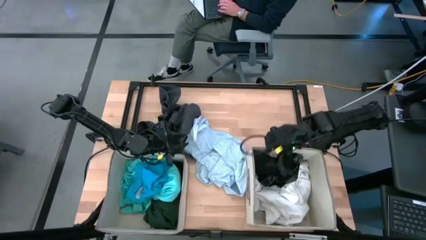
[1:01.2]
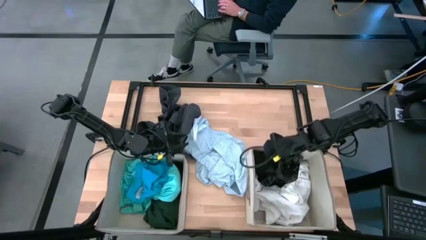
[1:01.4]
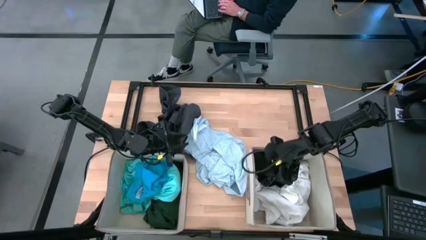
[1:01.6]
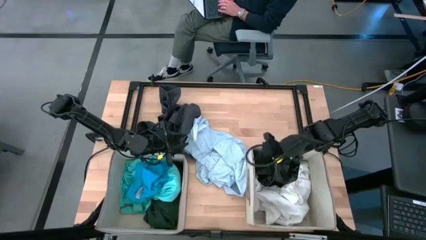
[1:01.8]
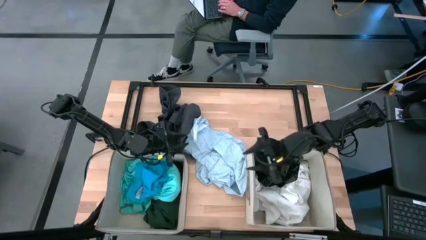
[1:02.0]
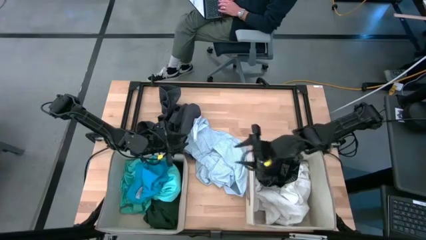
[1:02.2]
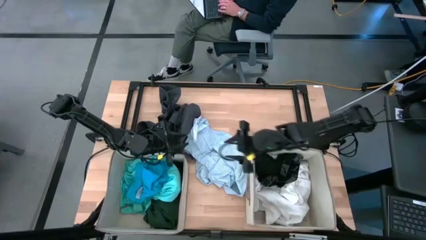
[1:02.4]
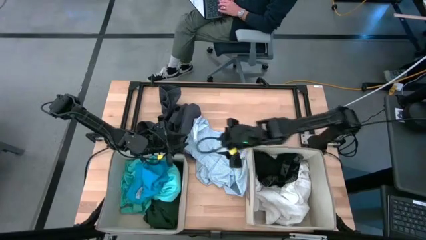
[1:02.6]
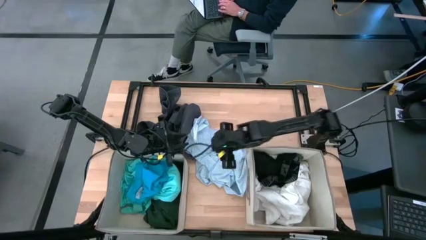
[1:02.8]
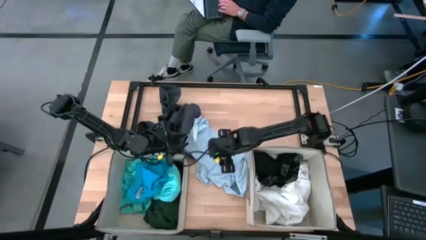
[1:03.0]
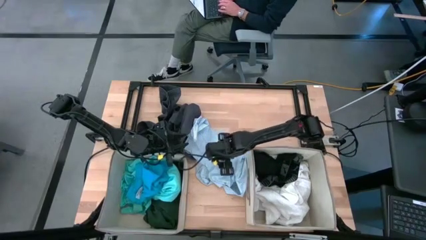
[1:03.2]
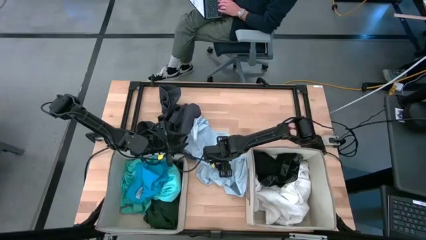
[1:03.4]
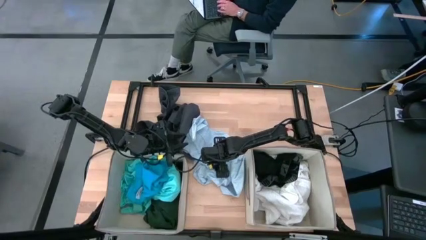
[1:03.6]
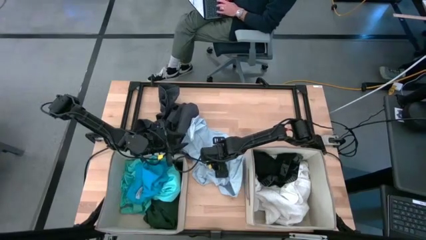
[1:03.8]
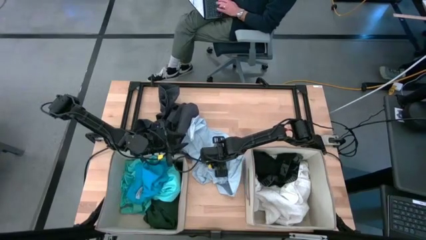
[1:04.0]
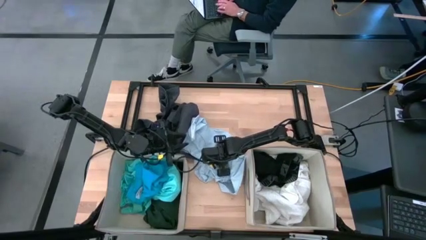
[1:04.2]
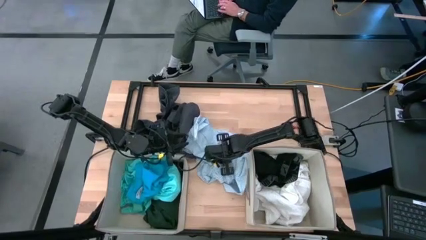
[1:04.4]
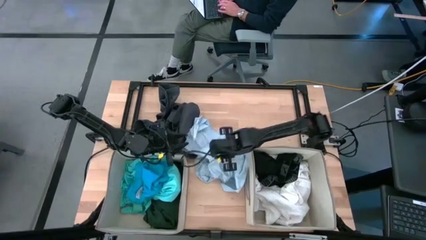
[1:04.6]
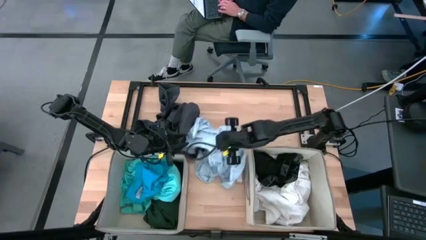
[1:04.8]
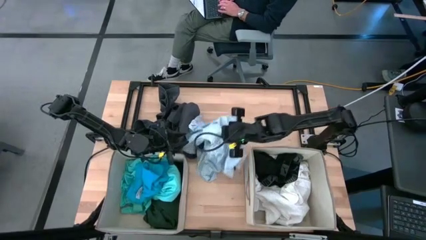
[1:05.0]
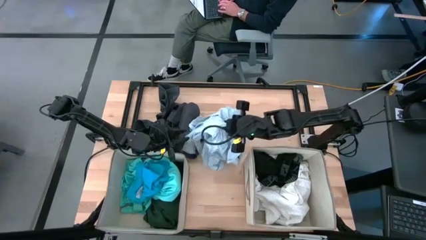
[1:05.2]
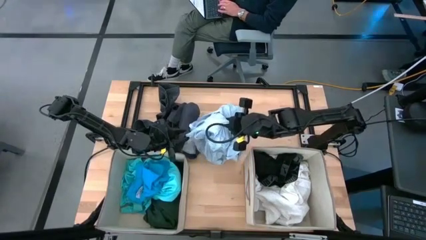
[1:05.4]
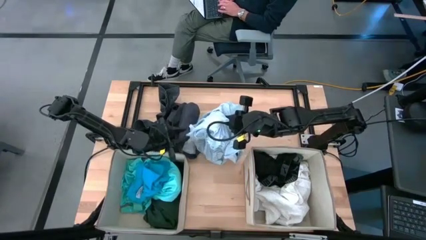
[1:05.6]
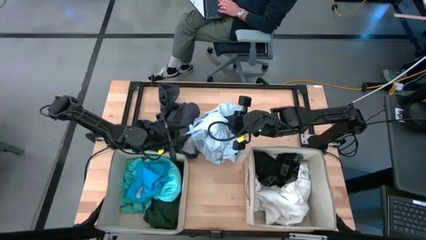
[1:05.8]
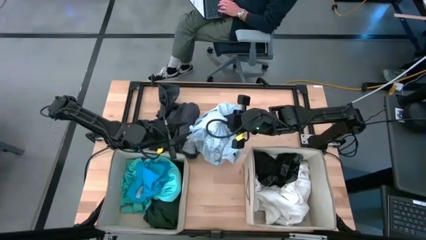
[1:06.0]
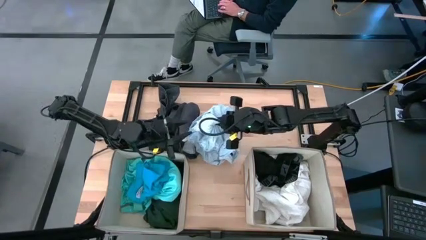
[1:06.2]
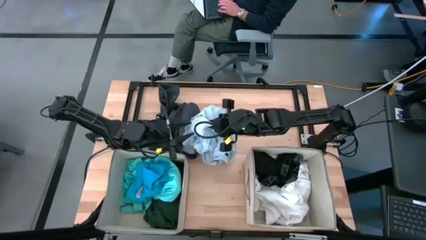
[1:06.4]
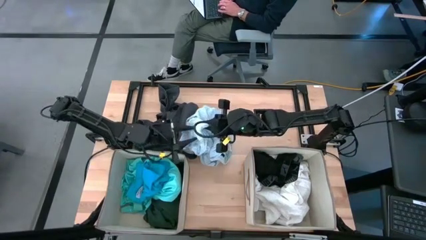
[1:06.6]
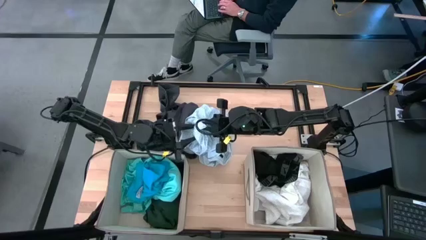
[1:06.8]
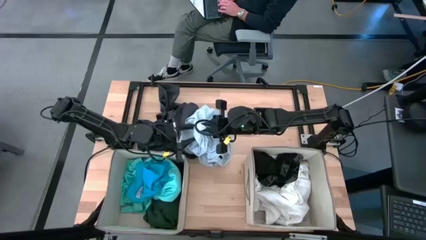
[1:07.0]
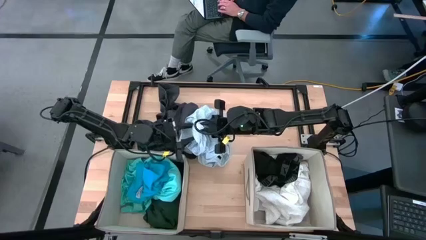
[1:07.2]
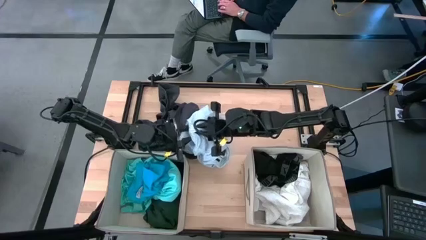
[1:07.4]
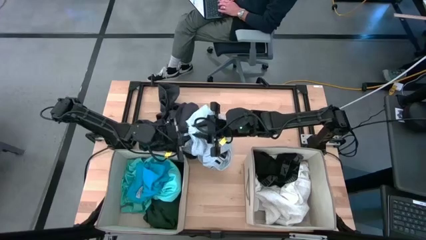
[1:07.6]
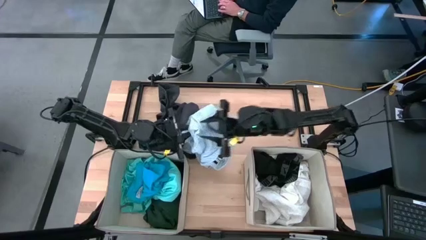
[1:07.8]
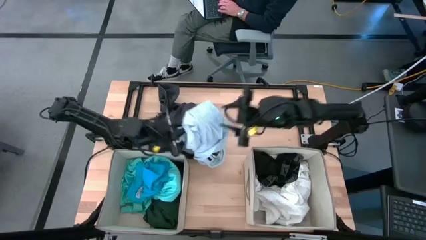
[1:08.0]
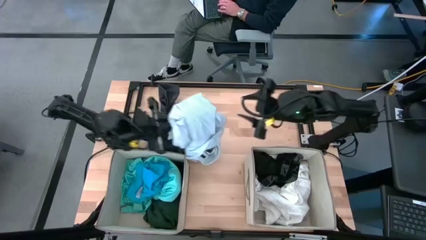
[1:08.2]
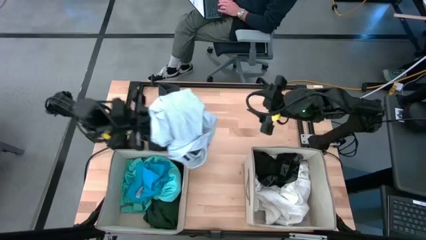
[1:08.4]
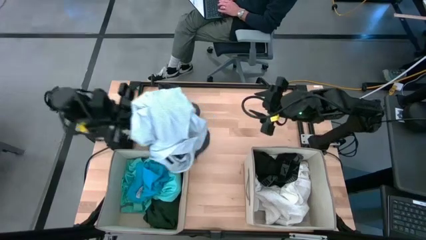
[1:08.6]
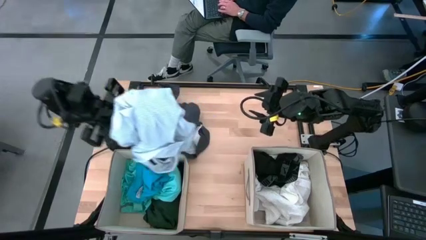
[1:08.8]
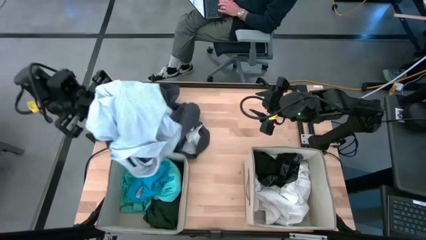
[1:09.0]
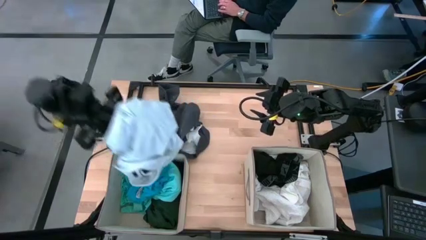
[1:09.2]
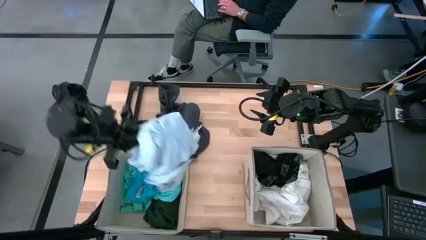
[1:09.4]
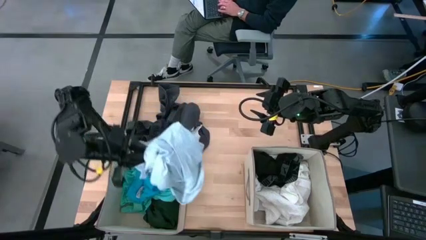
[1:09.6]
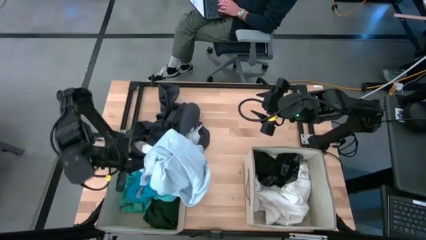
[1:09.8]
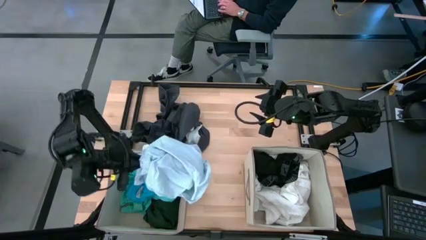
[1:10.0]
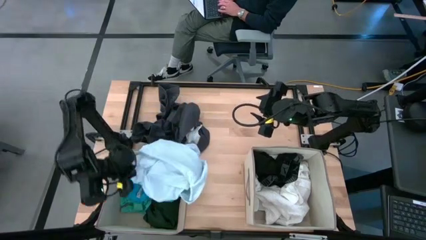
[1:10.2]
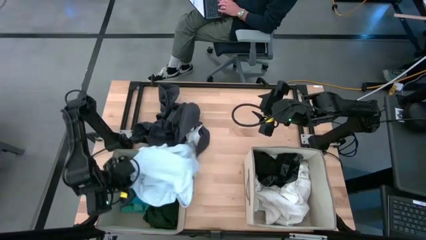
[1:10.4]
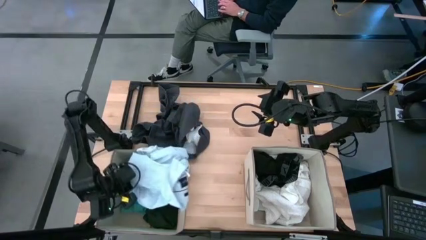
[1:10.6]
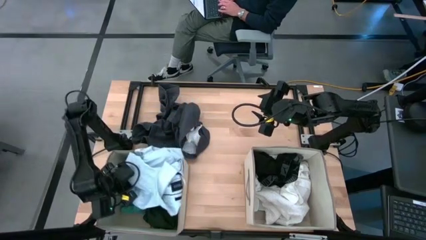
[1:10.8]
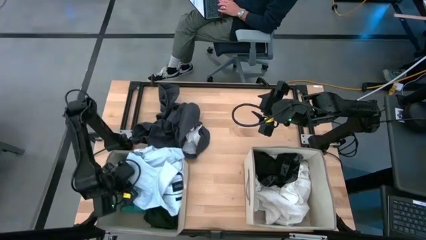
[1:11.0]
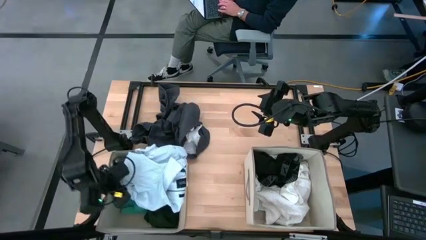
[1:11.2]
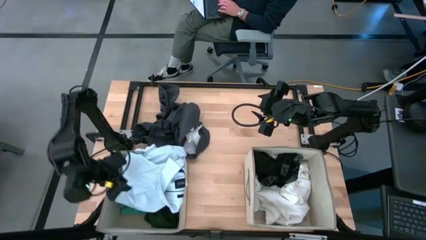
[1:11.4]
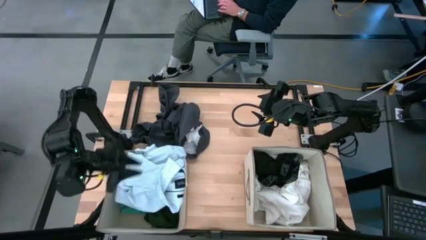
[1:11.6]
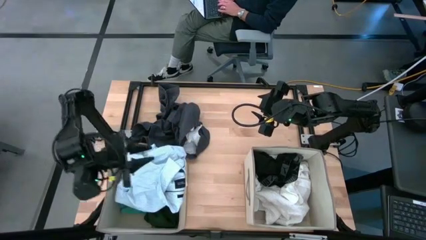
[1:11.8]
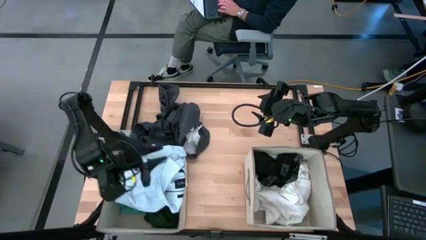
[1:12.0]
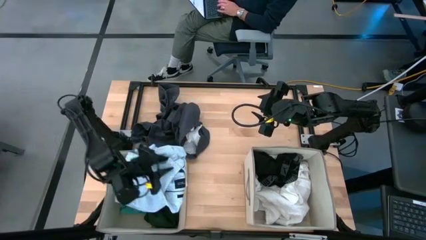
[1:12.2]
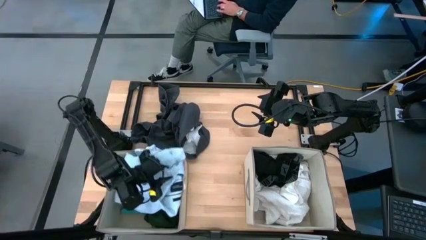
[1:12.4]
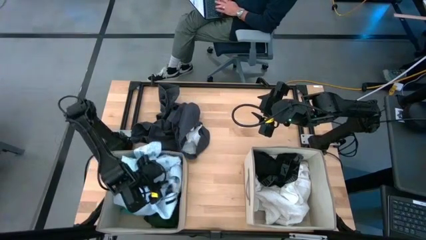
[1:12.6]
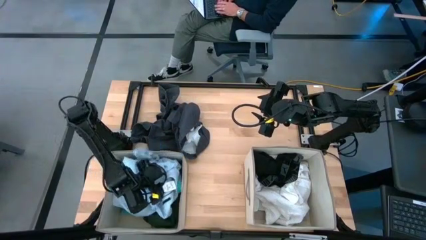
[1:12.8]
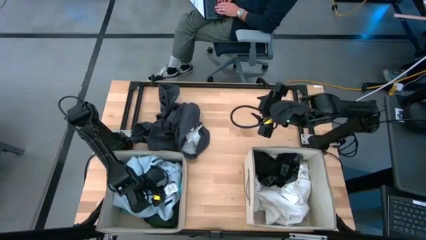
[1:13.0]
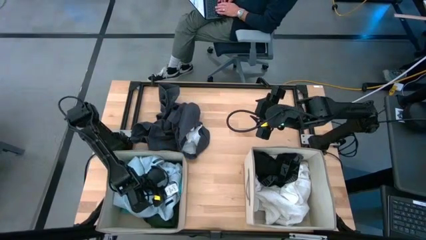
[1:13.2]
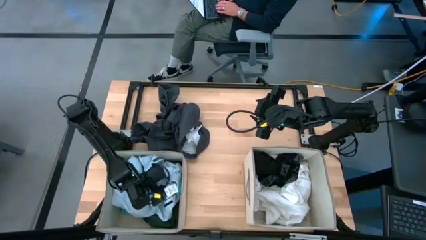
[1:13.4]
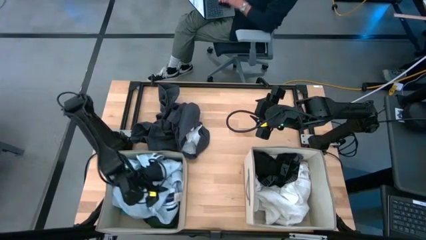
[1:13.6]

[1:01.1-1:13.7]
Task: Sort clothes
Put the blue patient gown into the left brown laundry organizer

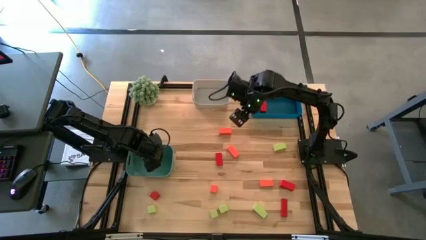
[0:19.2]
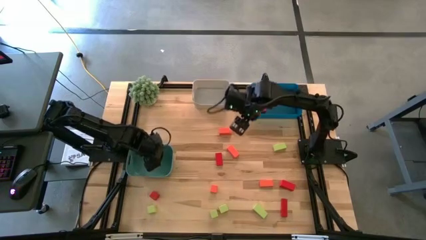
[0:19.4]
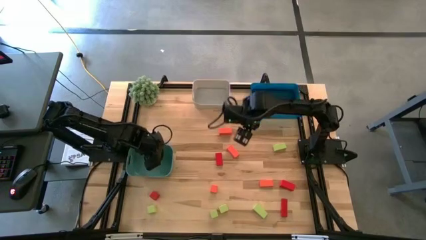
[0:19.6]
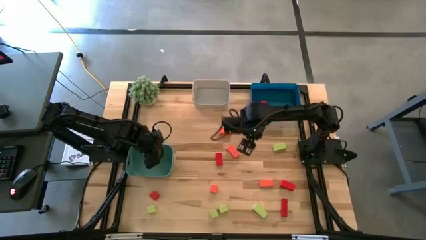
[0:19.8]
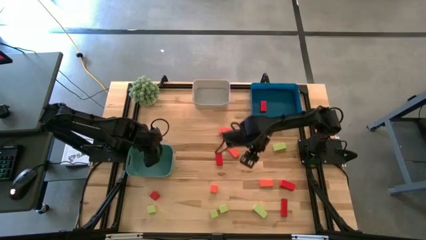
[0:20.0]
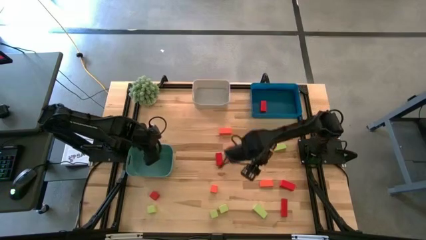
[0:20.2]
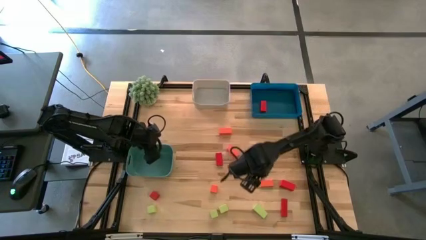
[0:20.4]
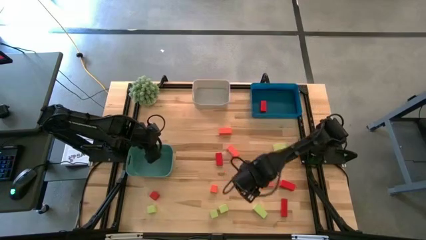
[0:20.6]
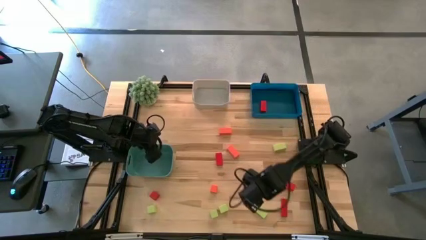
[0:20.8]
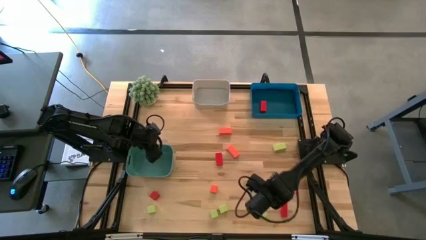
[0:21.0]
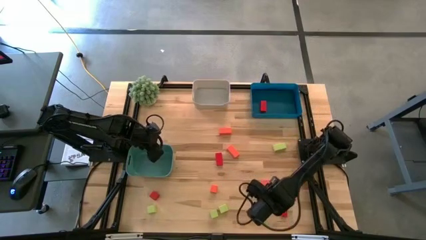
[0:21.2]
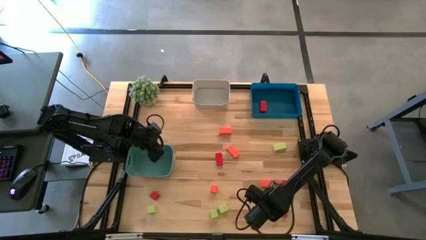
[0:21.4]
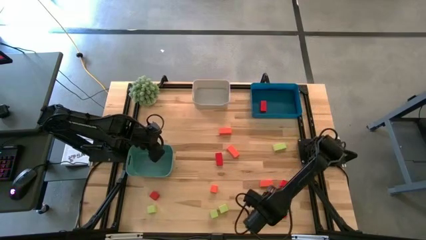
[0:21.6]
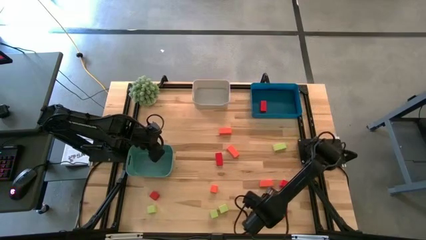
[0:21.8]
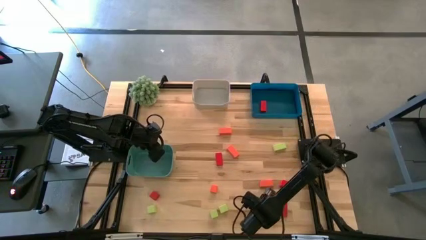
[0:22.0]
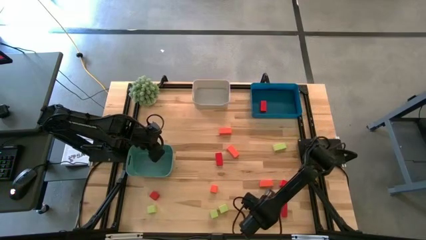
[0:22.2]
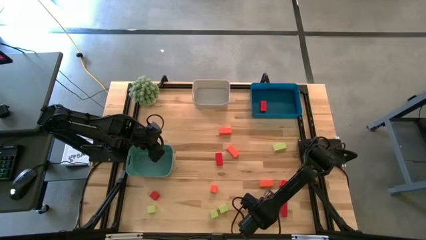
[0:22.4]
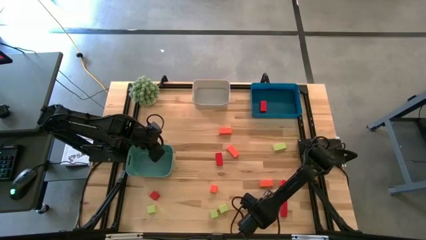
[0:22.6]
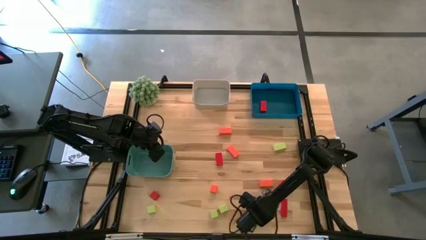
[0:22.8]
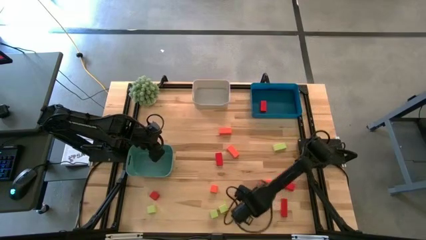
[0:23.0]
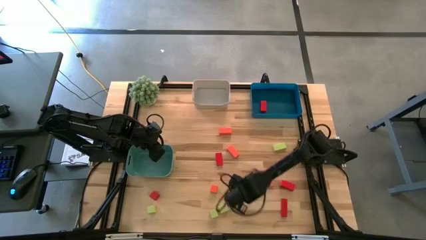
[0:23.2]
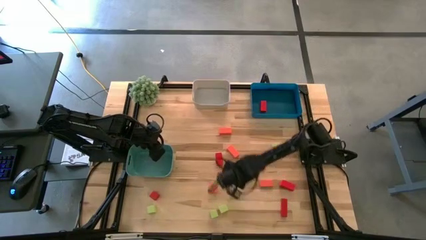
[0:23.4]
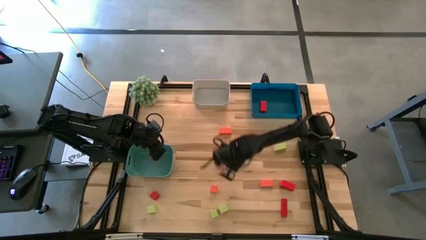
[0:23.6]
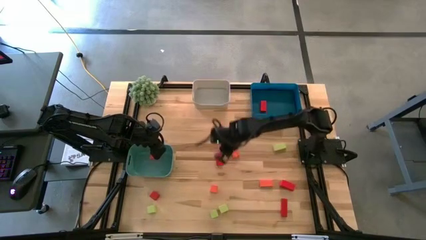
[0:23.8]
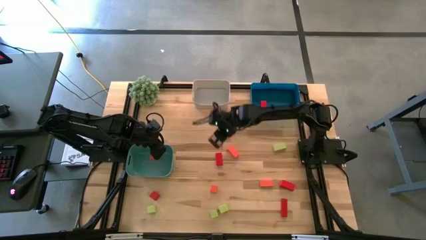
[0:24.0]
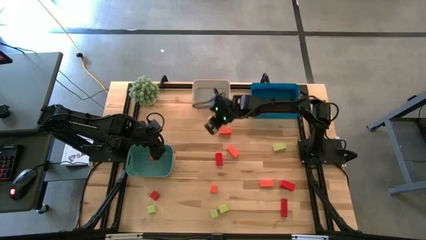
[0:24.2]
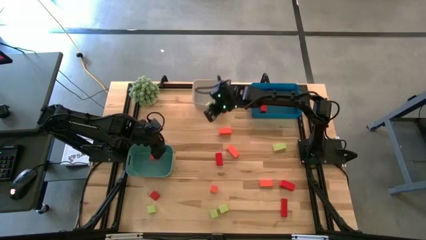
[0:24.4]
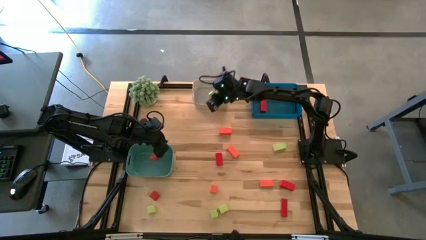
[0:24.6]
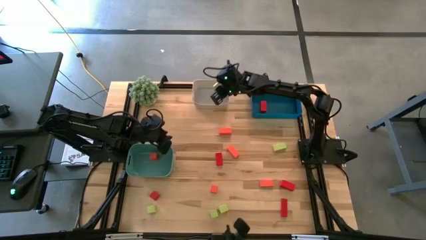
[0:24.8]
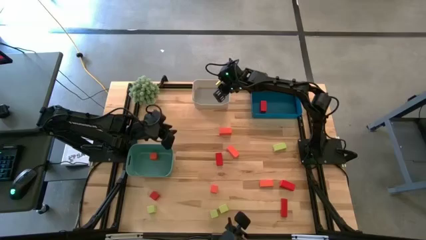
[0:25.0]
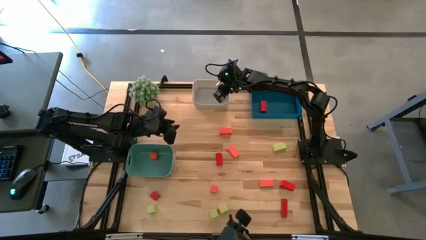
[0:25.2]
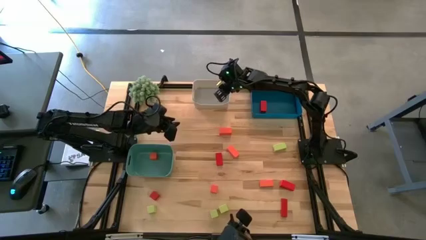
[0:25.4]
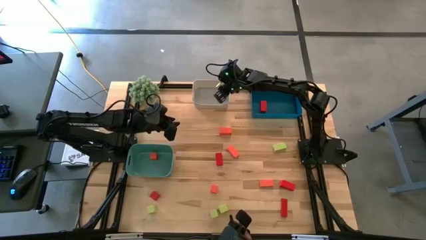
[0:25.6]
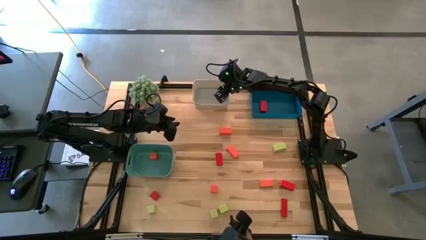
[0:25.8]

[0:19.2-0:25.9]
Task: Sort & place blocks by color
Put the green block into the gray bin
